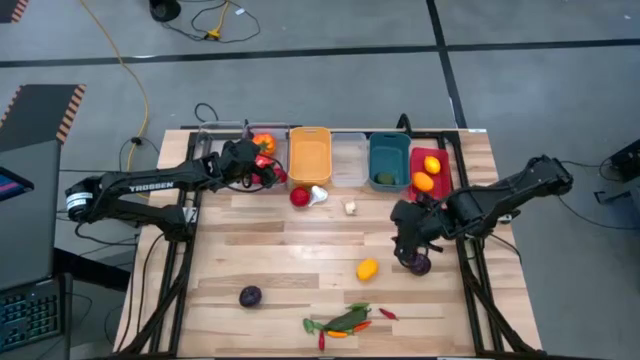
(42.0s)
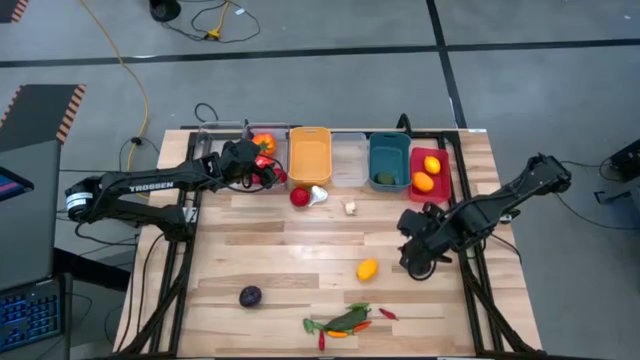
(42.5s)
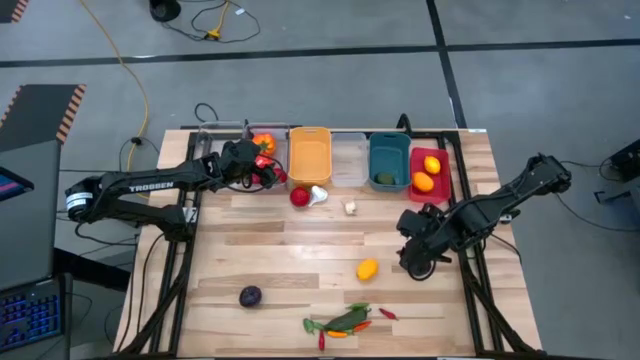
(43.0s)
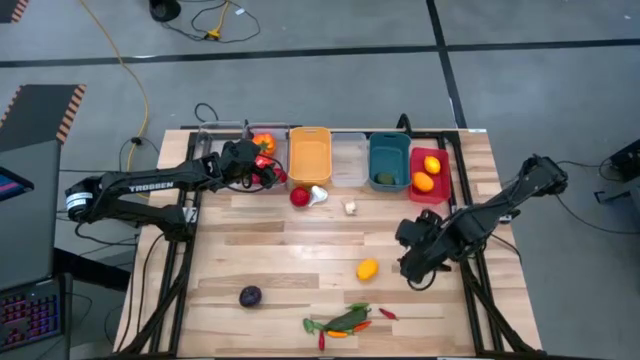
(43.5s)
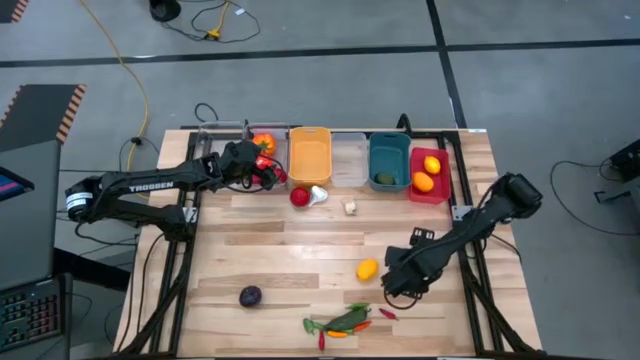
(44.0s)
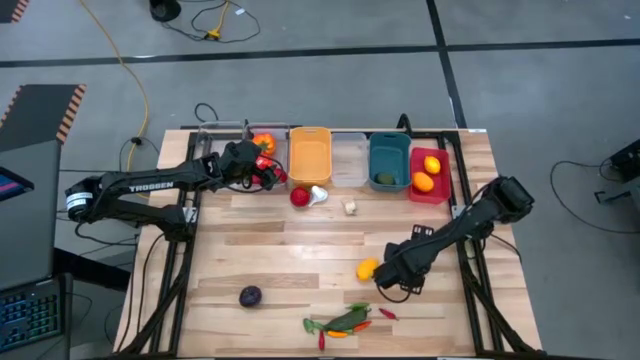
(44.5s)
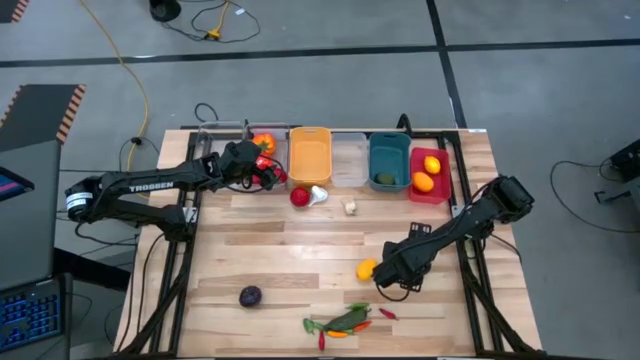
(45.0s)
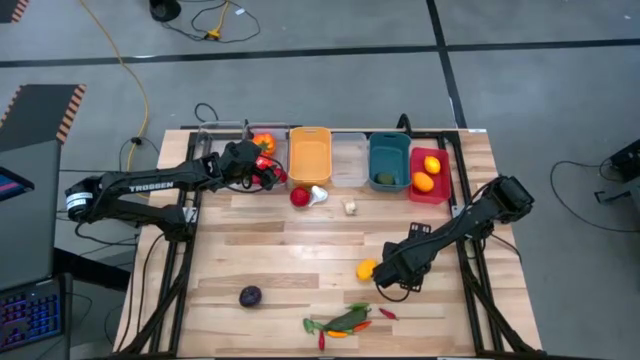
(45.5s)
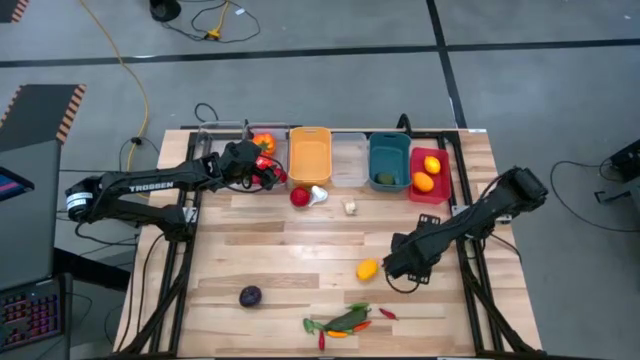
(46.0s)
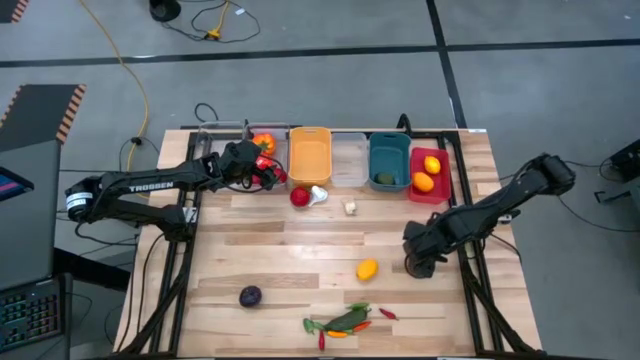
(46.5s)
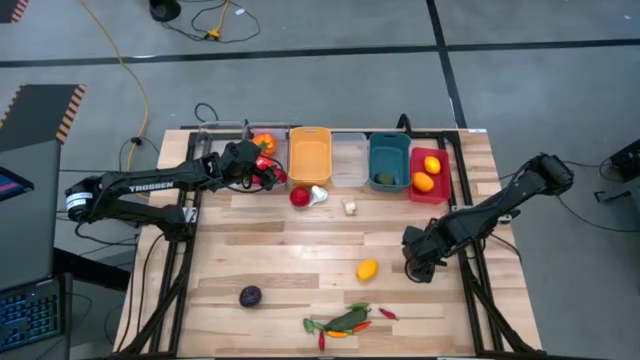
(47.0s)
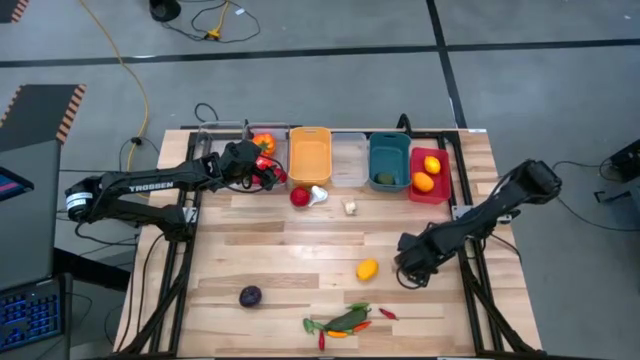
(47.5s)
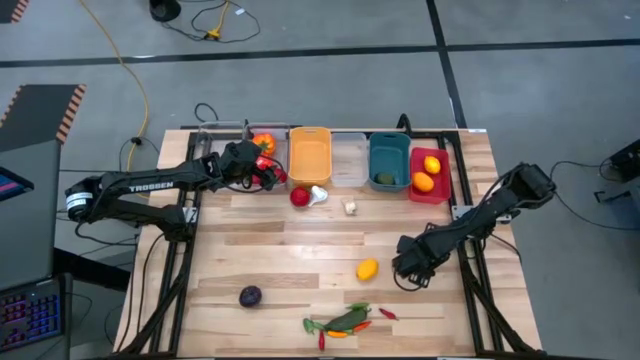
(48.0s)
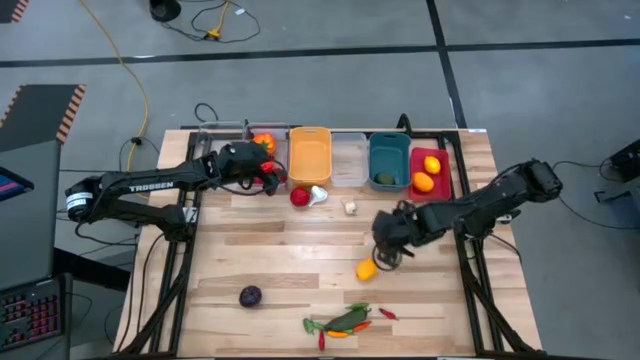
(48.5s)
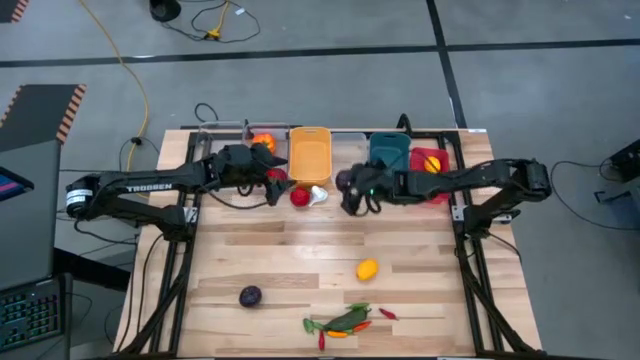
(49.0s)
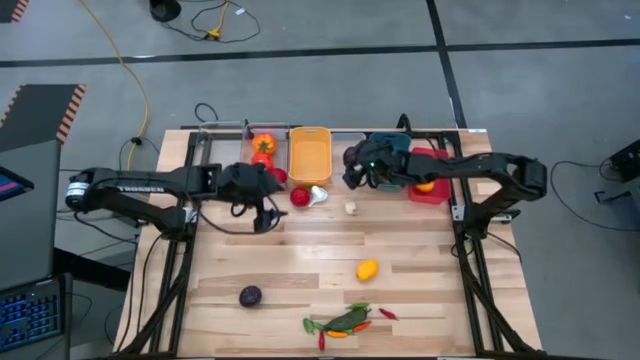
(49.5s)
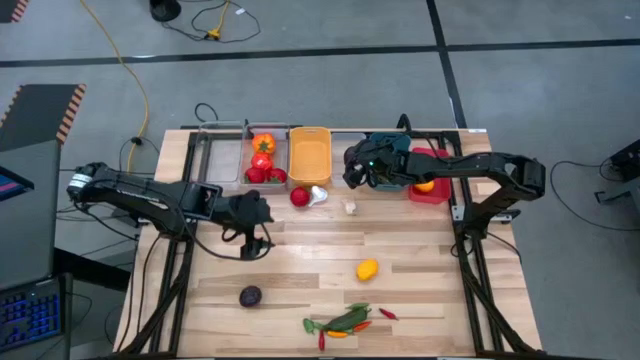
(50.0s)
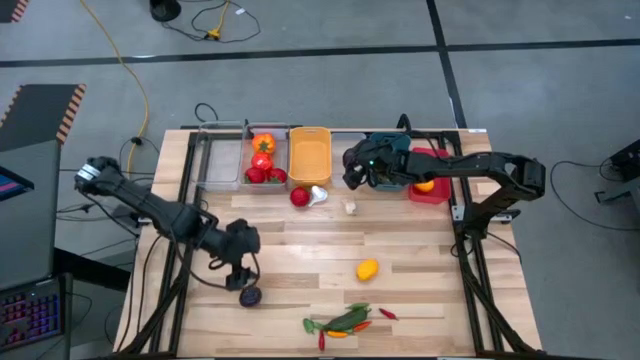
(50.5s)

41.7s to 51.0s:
Task: Sort produce into baskets
Put the plum into the white bin

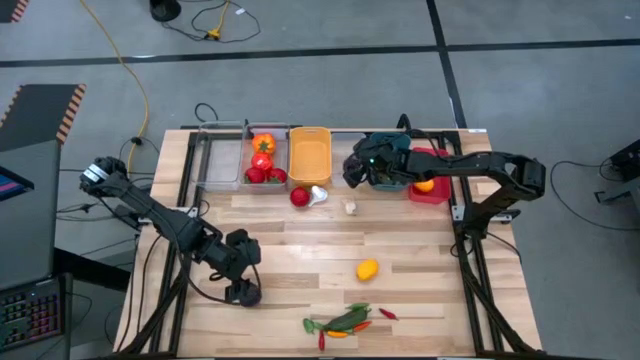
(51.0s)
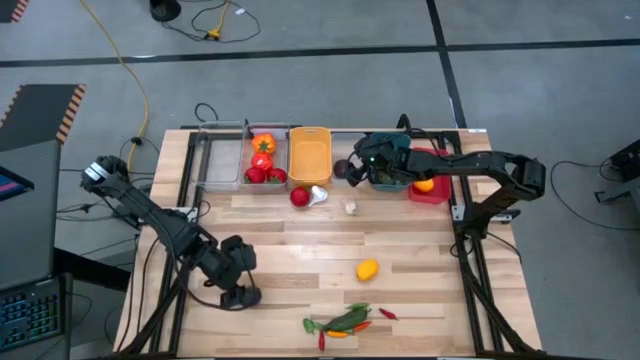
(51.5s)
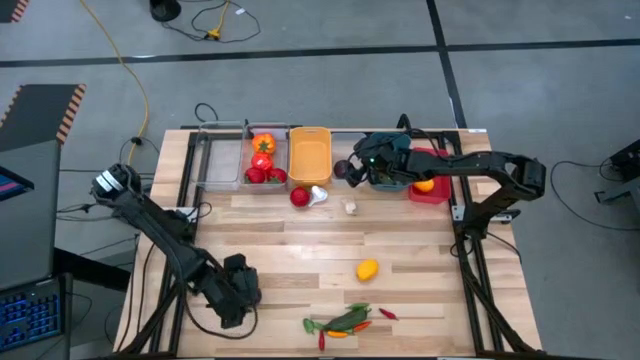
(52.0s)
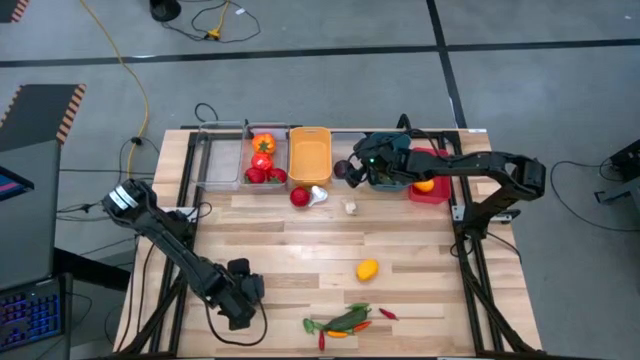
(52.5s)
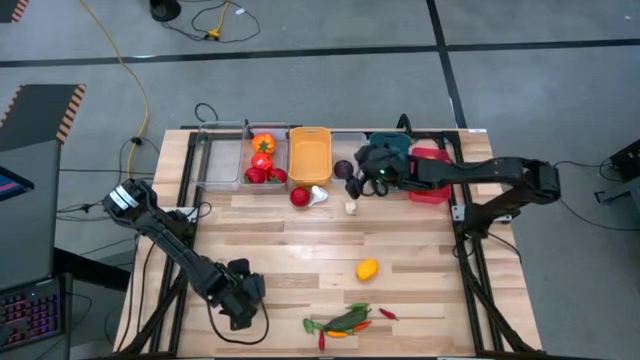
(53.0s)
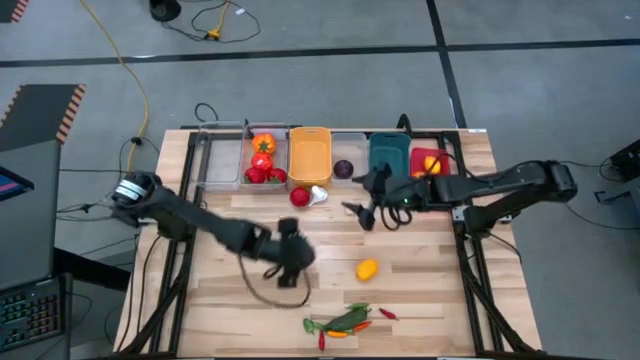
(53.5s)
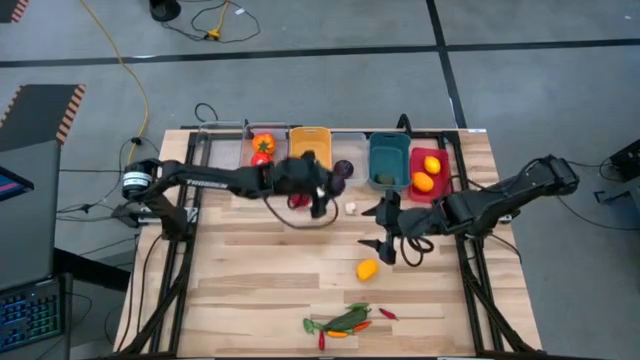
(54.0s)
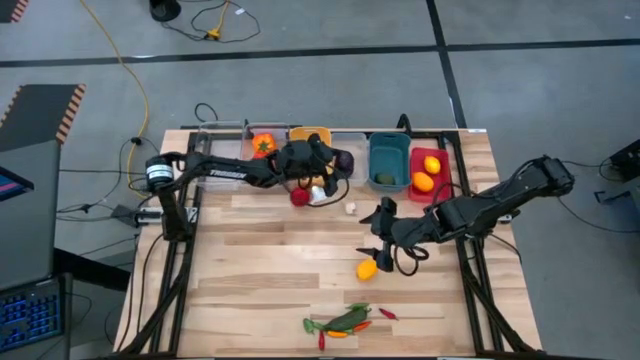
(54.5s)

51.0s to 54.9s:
Put the plum into the white bin

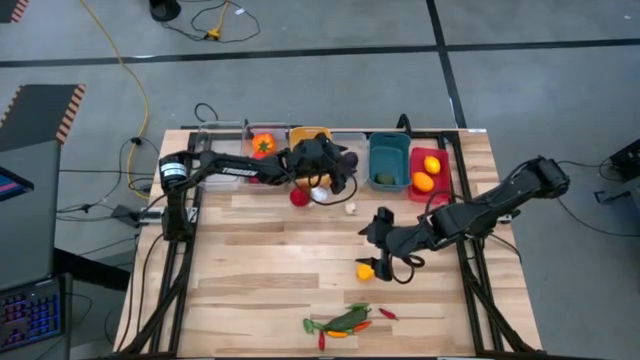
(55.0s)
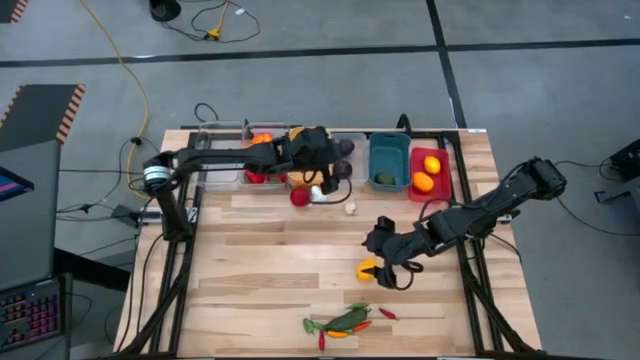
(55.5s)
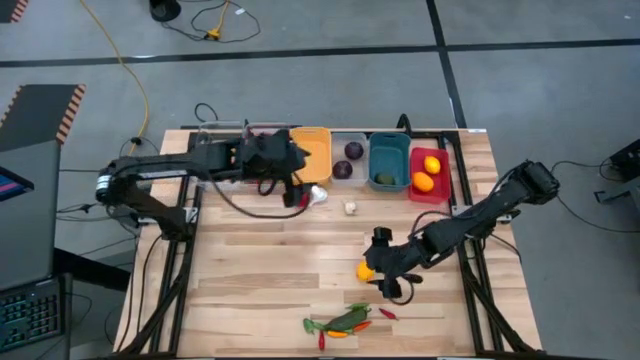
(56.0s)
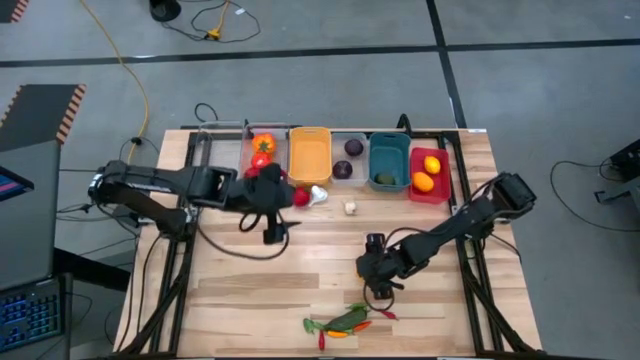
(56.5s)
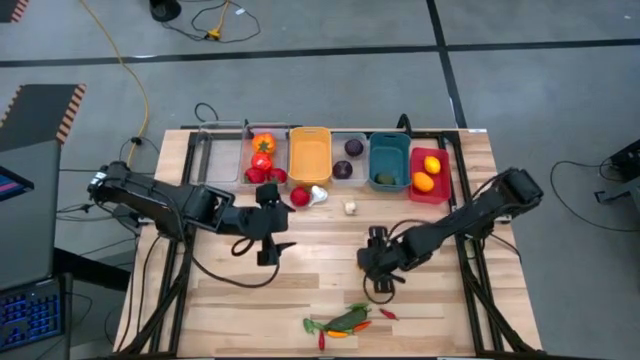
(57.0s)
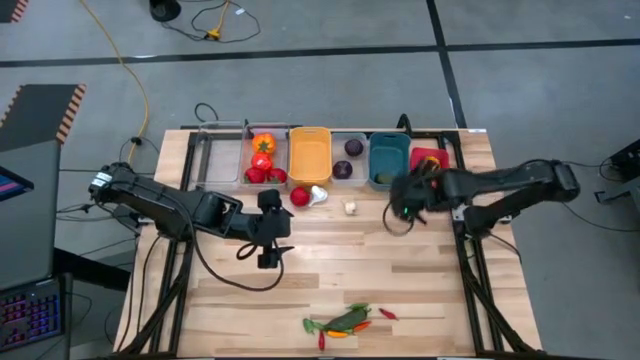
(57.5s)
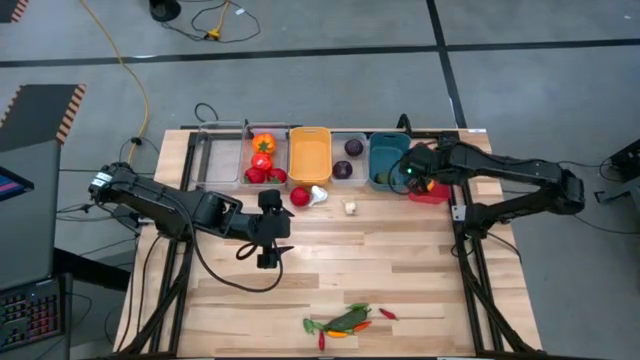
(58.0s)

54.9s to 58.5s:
Put the lemon into the red bin

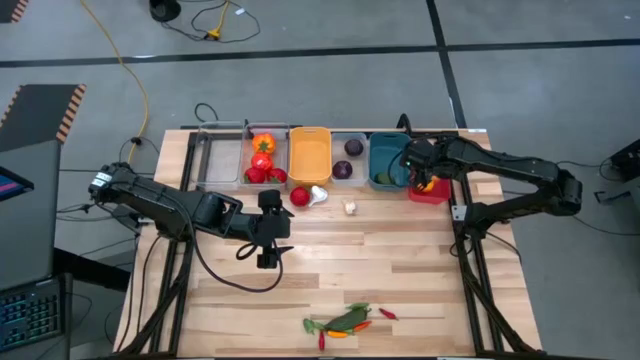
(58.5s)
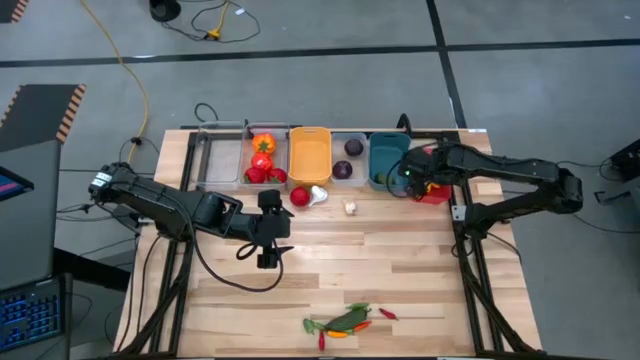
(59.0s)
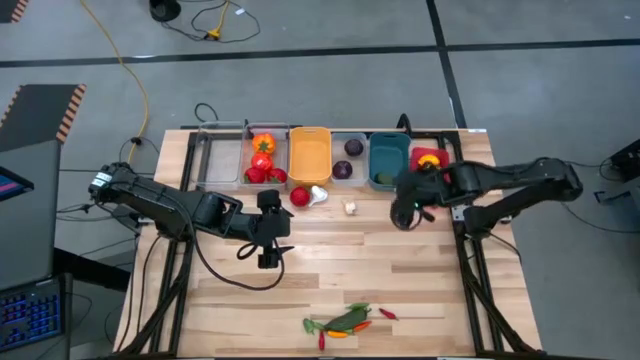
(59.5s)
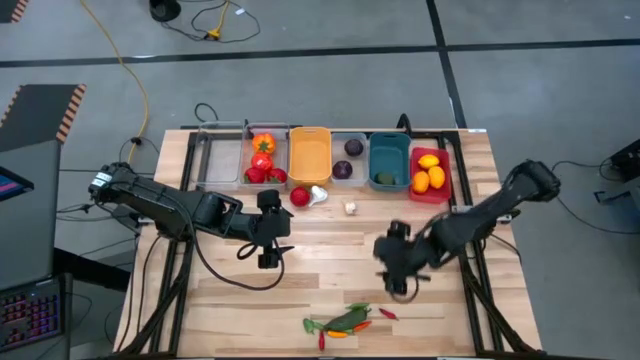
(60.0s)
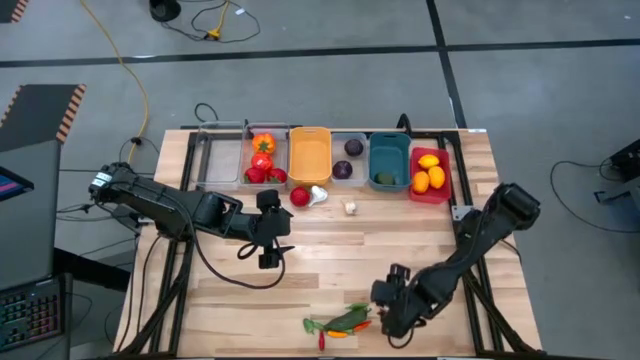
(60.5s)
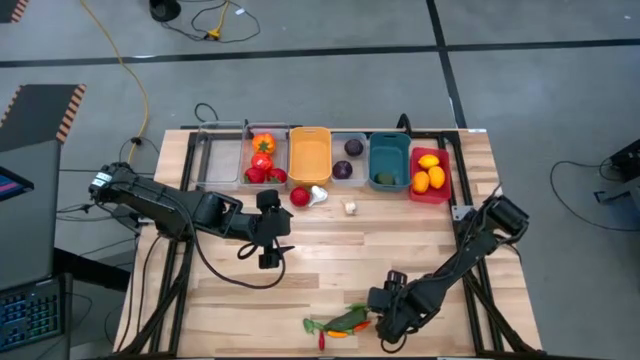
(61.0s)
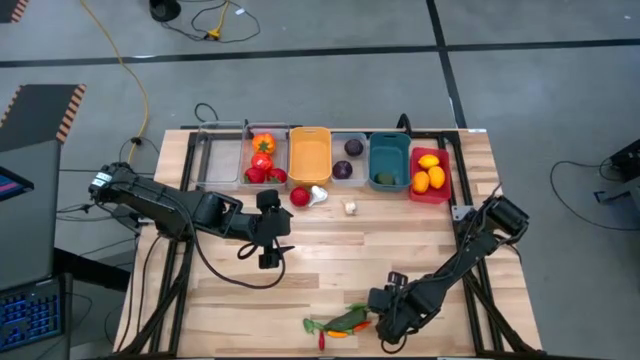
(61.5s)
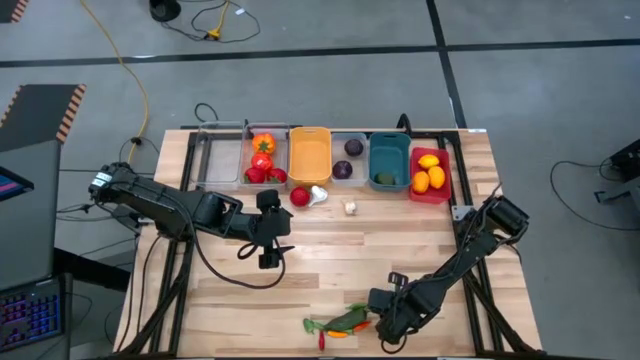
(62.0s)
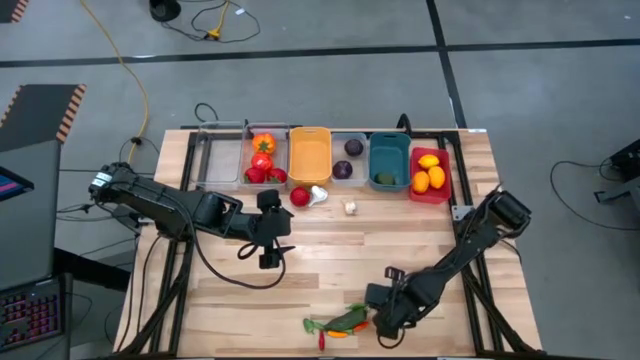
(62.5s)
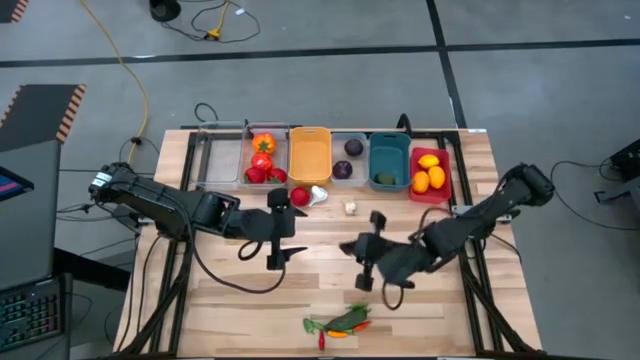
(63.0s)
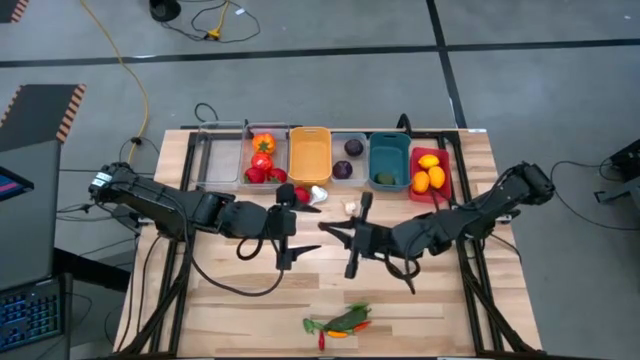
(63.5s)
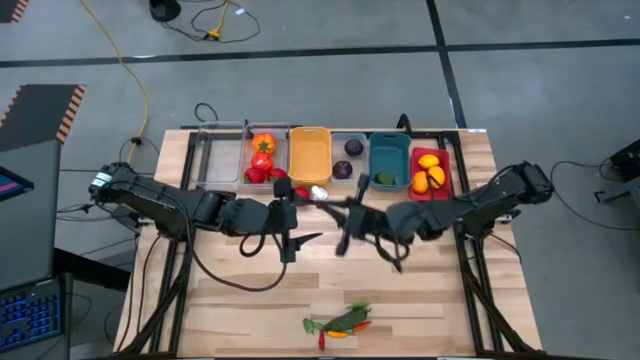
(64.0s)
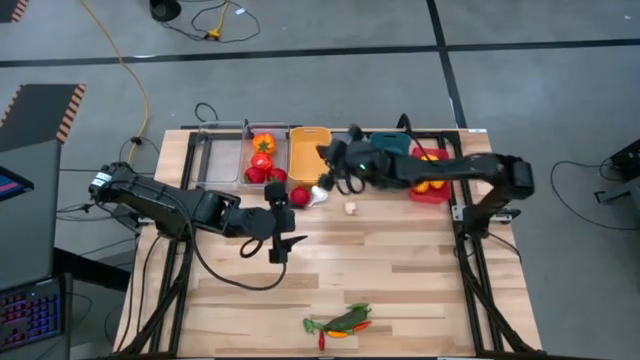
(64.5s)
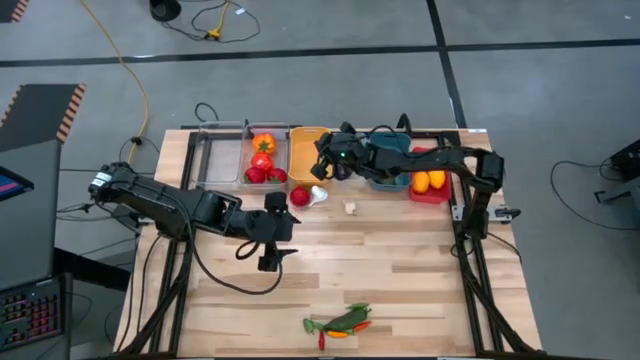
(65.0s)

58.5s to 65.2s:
Put the red chili pepper into the yellow bin
